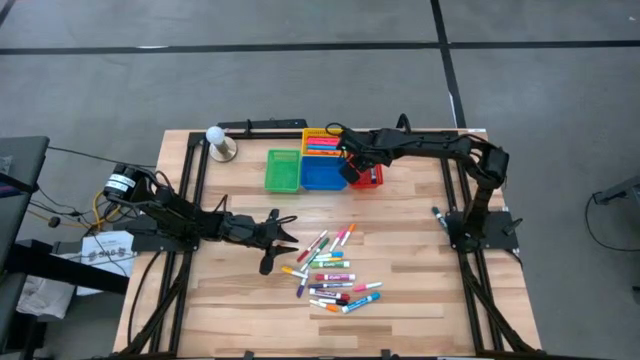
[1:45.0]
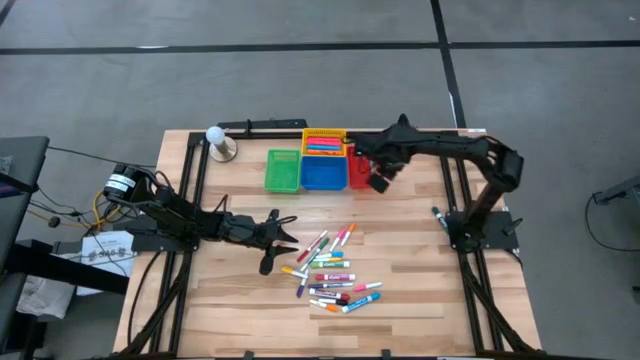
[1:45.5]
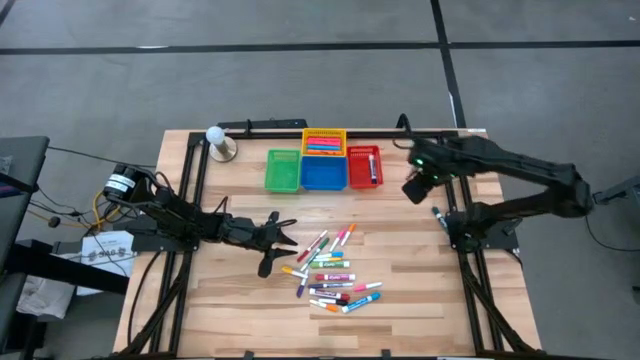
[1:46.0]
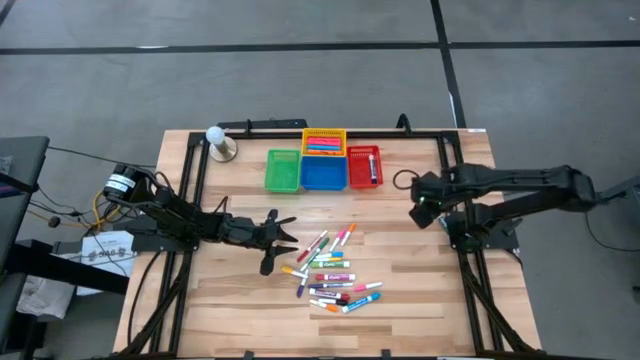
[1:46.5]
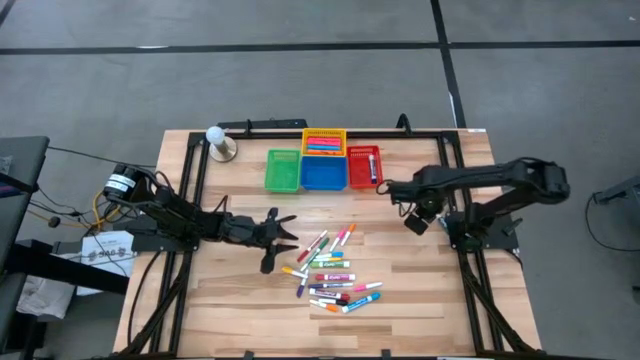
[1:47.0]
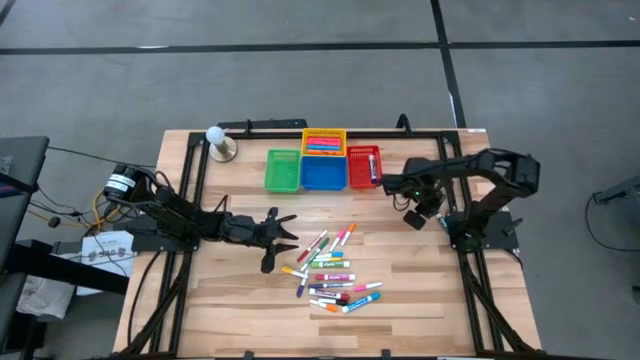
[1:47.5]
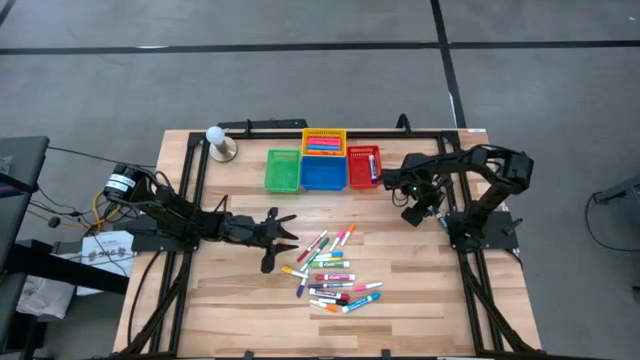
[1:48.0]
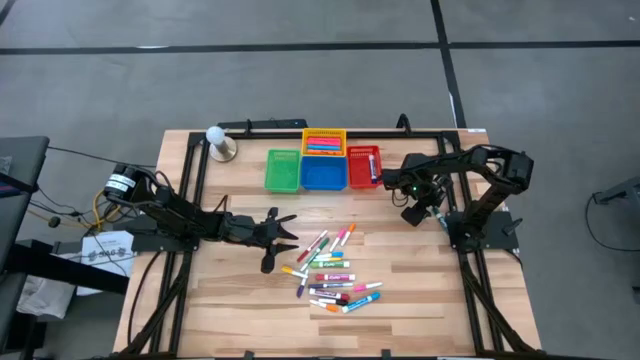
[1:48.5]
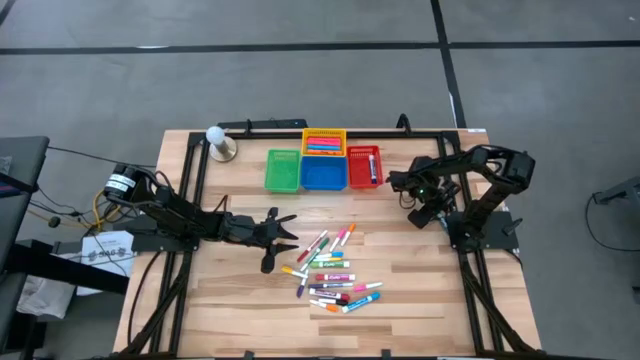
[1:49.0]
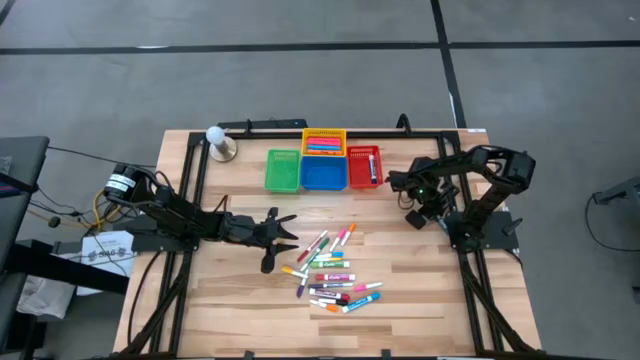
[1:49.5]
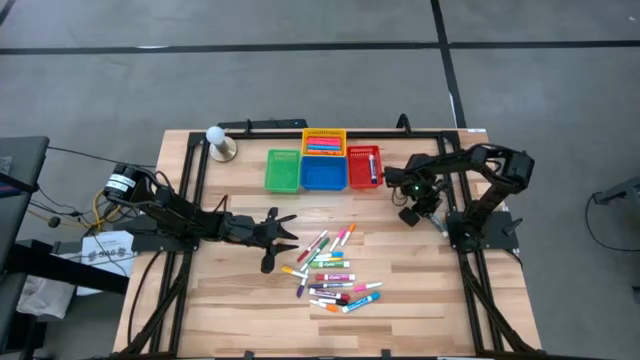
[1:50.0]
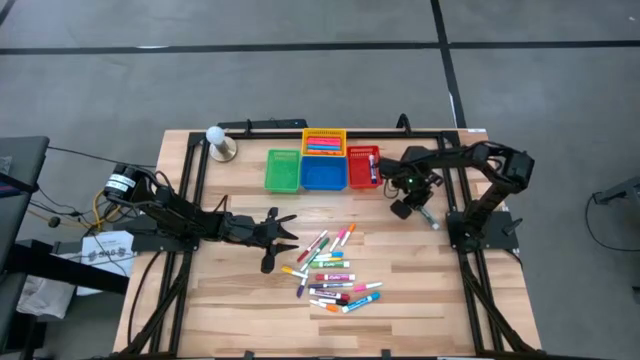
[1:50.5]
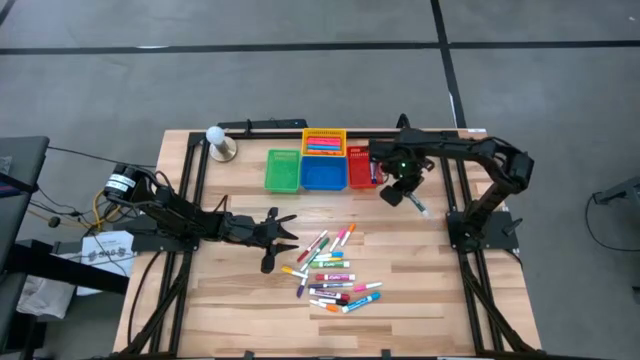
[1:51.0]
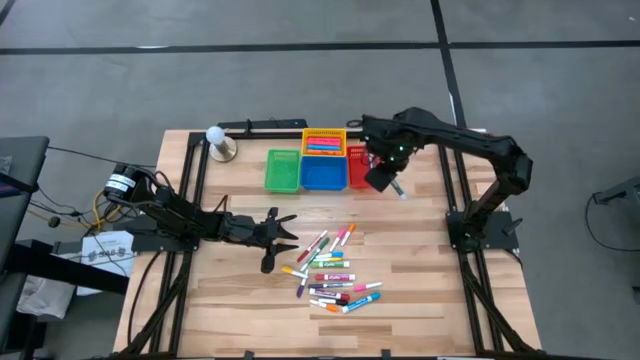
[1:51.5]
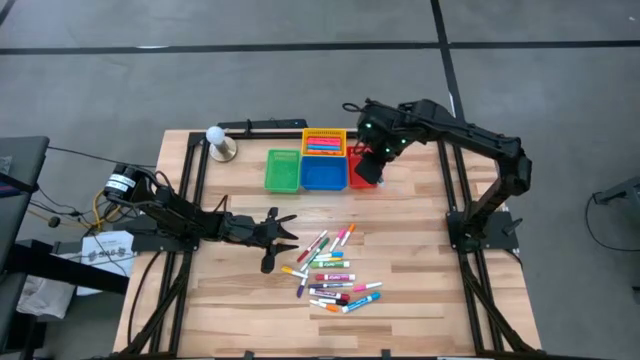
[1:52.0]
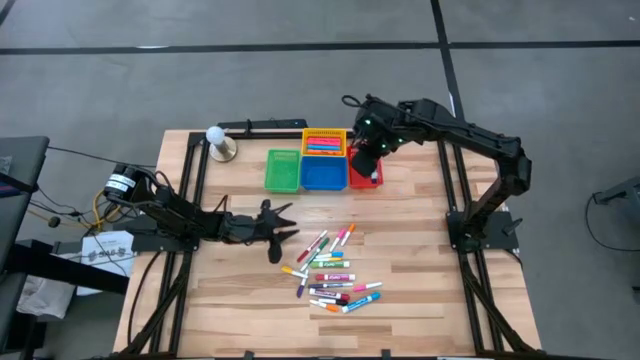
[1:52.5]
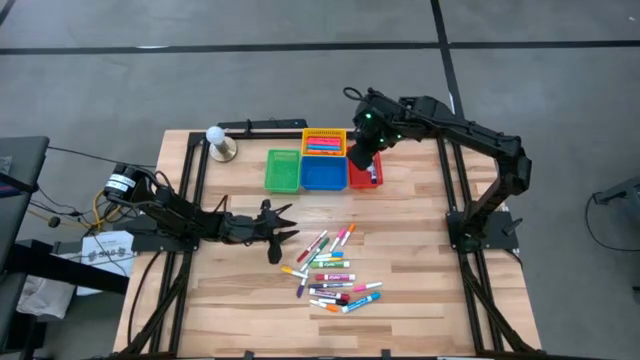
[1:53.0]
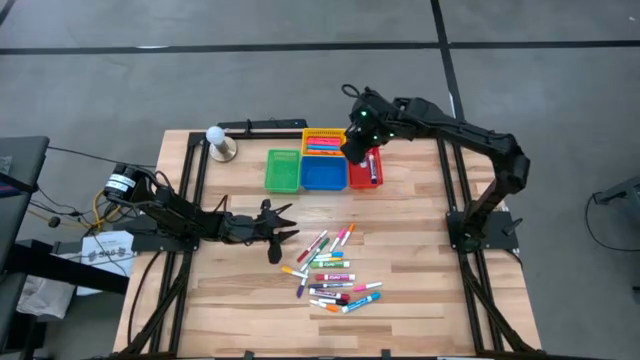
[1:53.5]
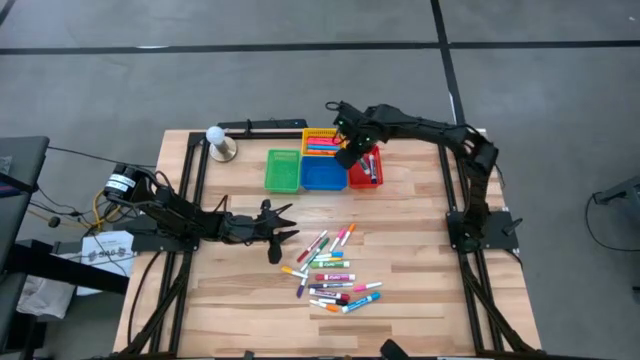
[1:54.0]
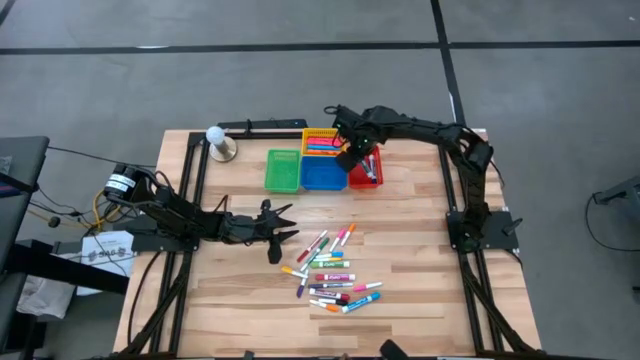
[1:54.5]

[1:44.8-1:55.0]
Task: Pick & Place Markers
Put the large green marker pen into the red bin

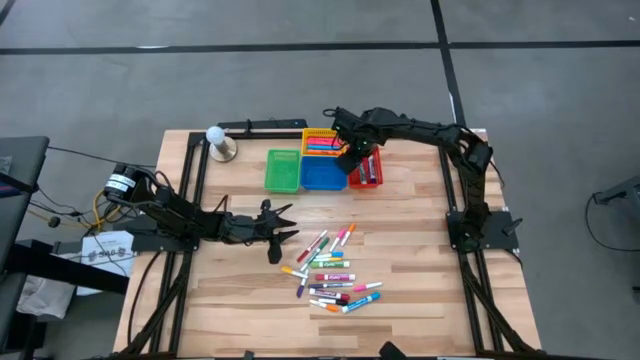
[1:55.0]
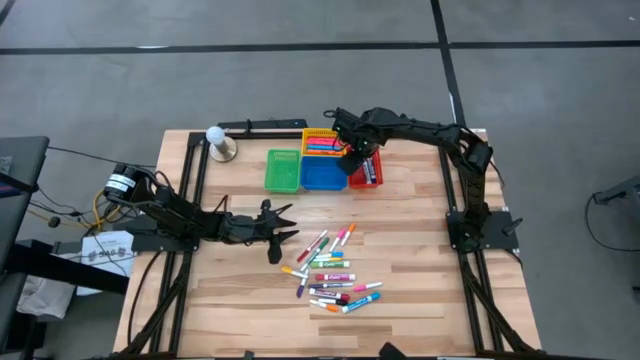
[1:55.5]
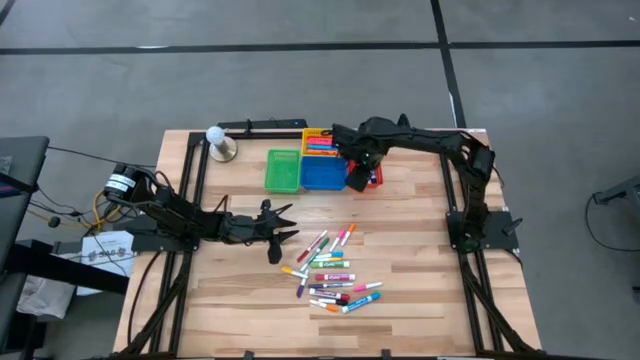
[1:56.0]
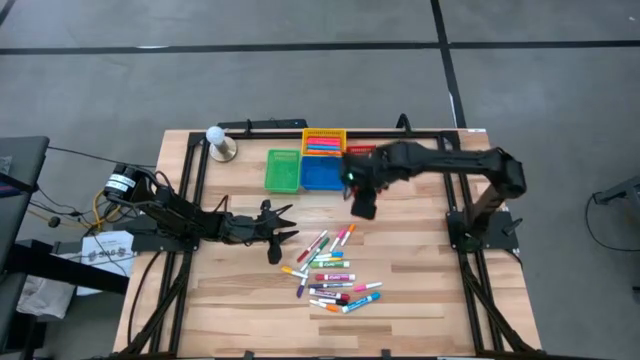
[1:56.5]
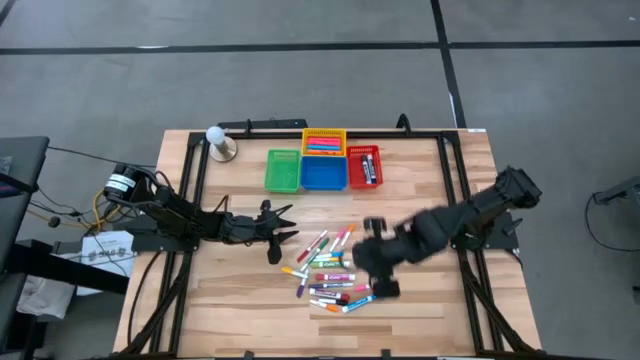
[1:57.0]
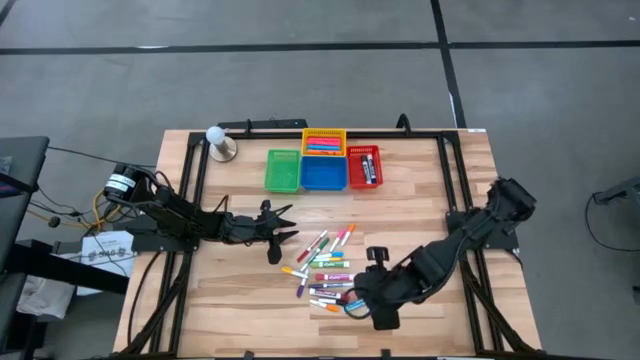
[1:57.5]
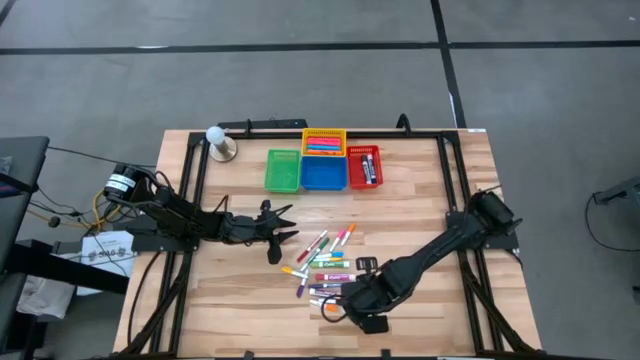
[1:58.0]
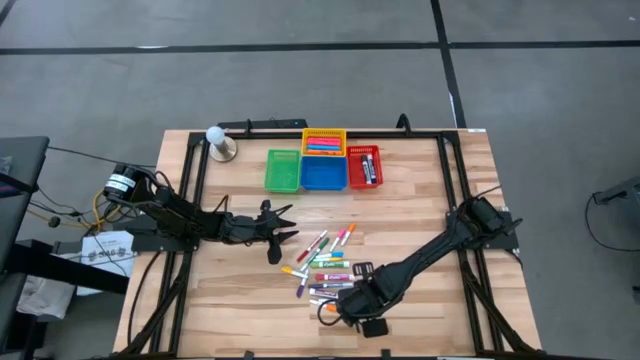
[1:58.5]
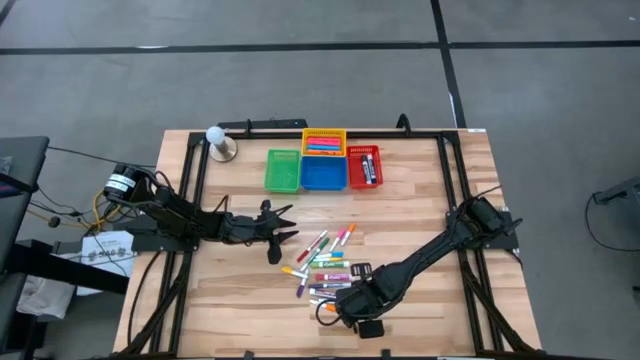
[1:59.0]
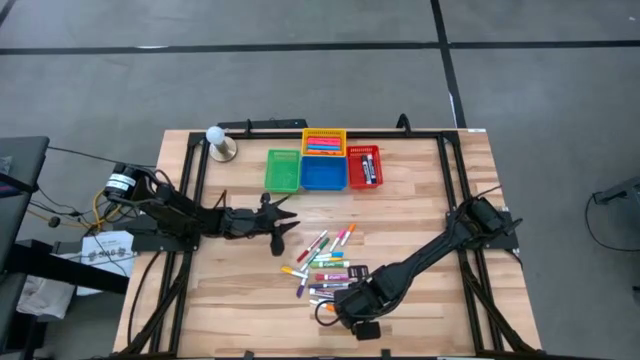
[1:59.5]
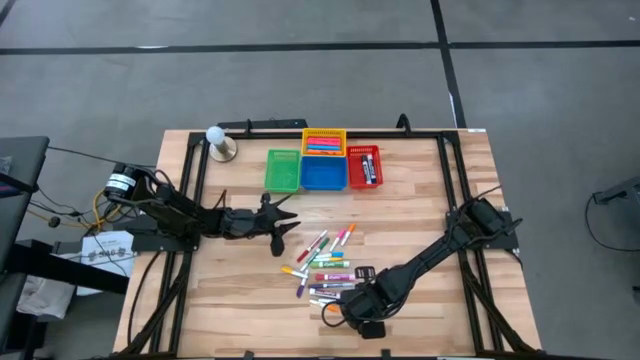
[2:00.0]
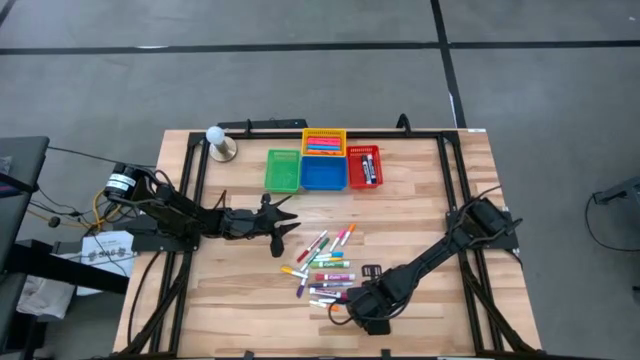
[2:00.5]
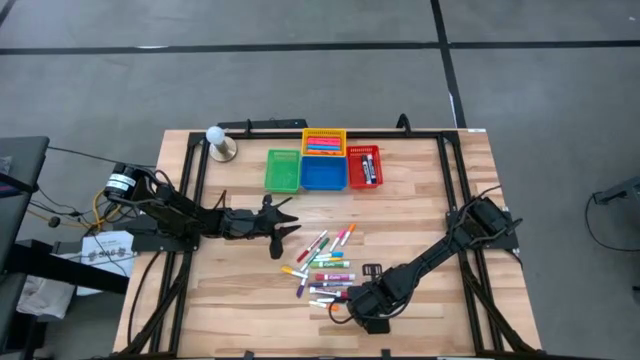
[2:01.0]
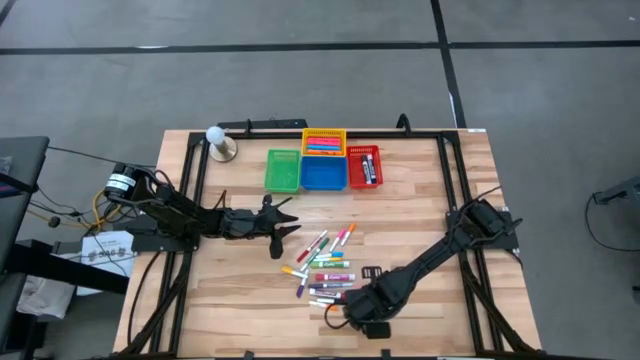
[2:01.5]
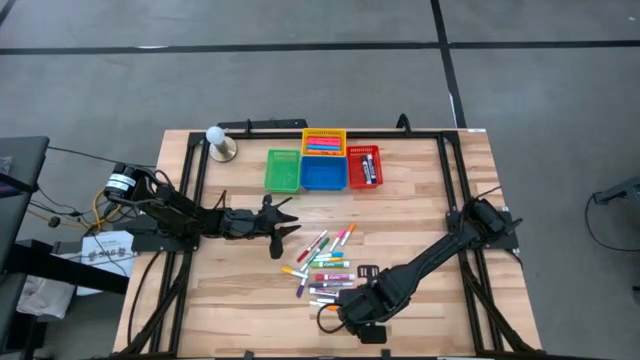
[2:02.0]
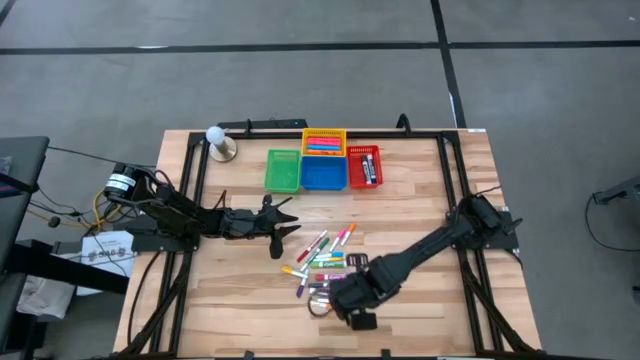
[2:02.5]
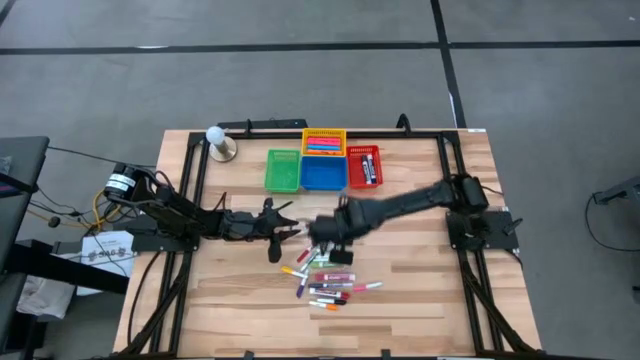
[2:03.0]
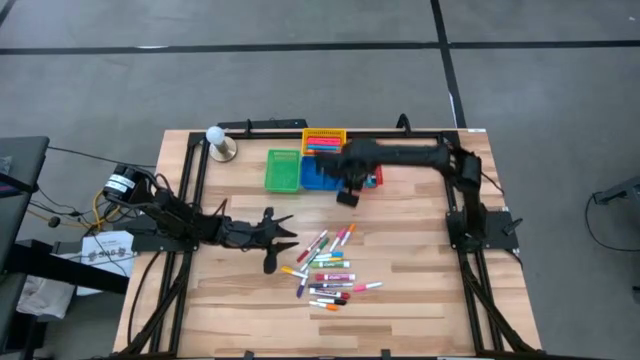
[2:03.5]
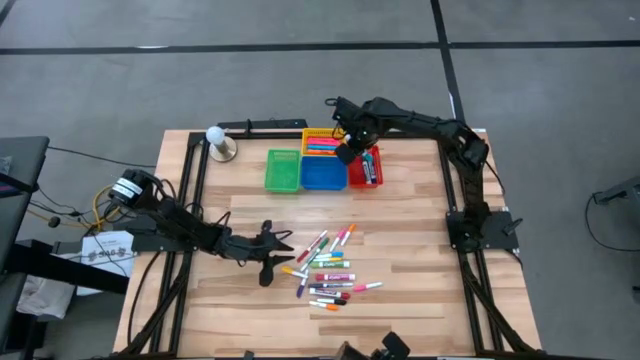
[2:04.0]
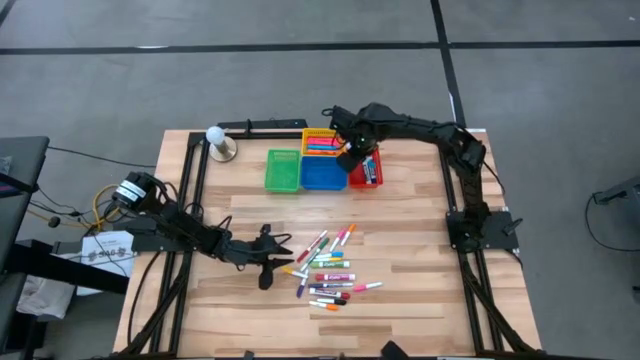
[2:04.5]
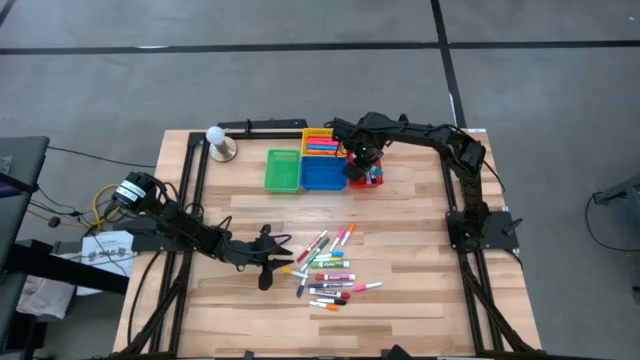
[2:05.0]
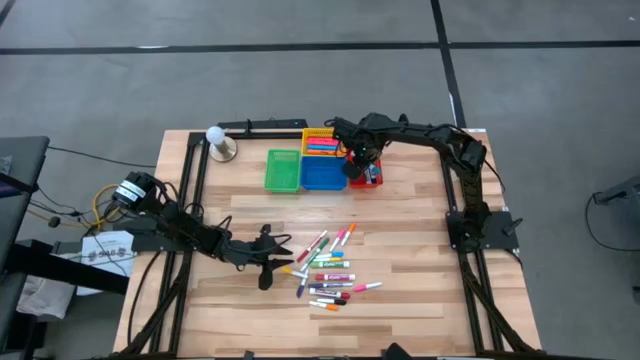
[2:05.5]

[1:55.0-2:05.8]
Put the large light blue marker pen into the red bin
